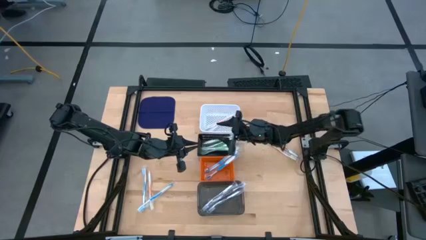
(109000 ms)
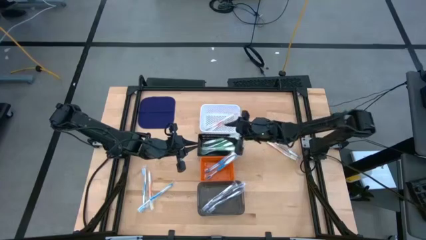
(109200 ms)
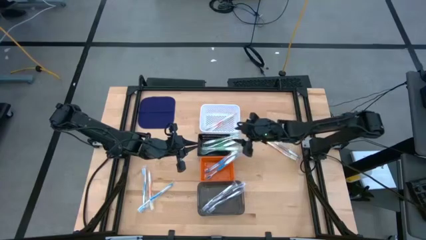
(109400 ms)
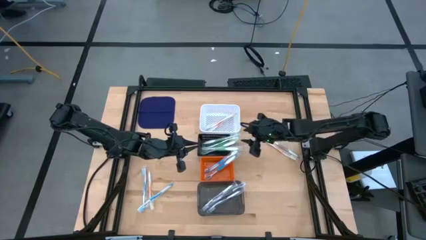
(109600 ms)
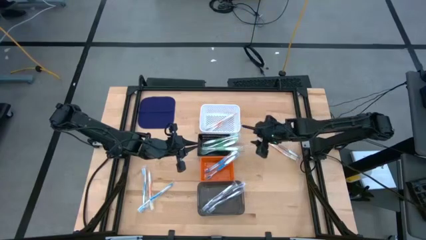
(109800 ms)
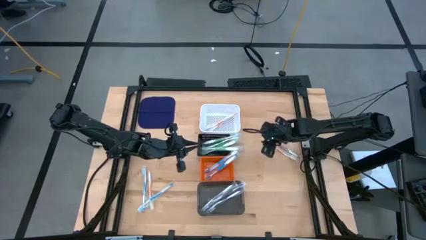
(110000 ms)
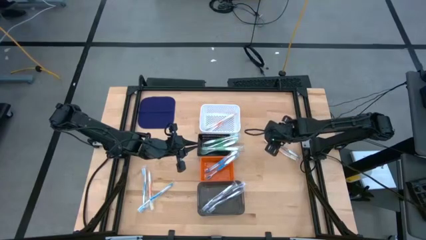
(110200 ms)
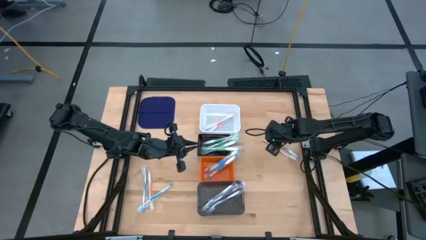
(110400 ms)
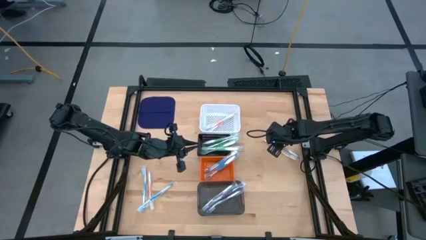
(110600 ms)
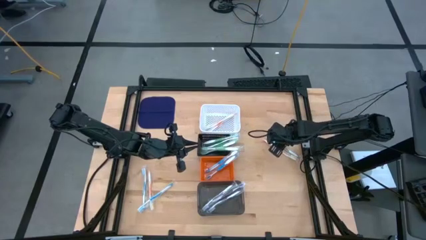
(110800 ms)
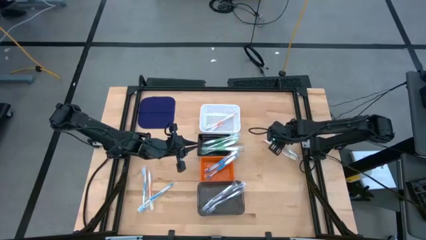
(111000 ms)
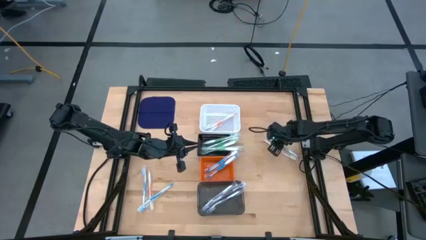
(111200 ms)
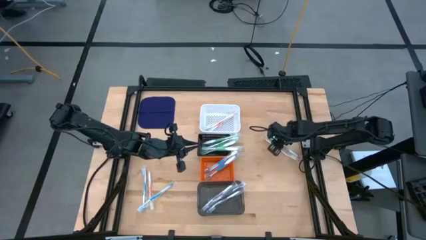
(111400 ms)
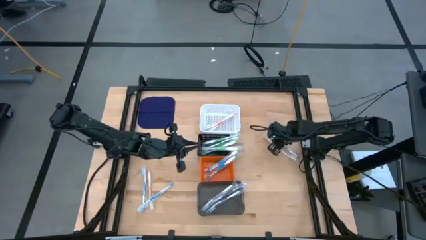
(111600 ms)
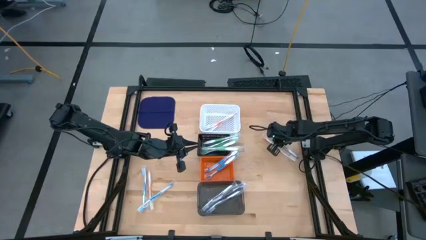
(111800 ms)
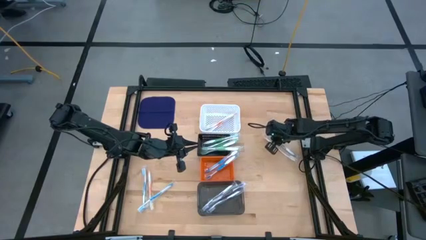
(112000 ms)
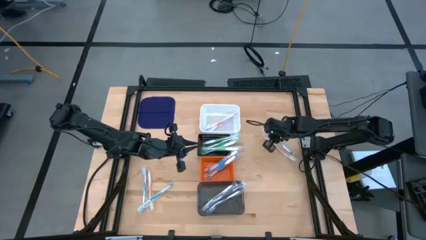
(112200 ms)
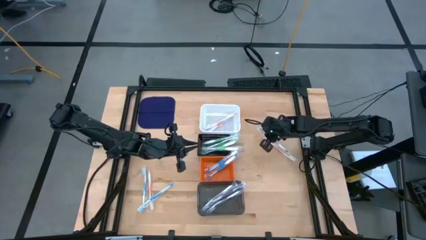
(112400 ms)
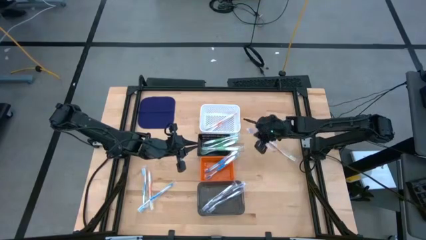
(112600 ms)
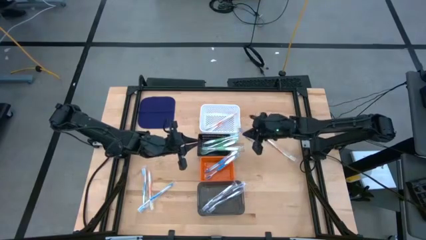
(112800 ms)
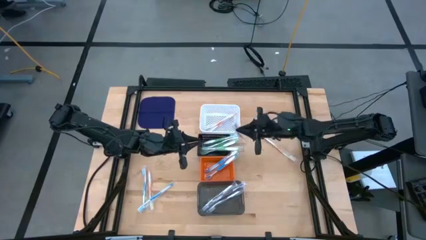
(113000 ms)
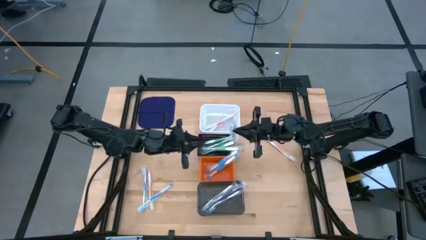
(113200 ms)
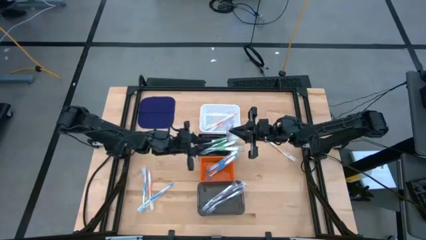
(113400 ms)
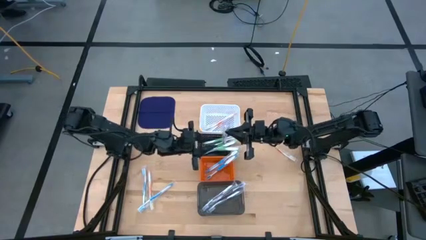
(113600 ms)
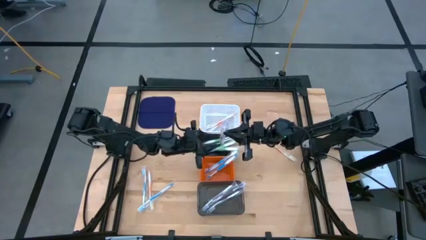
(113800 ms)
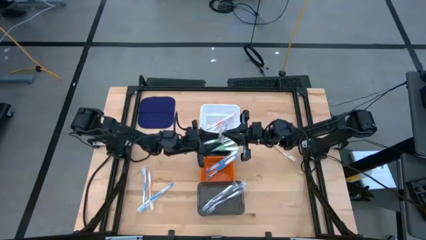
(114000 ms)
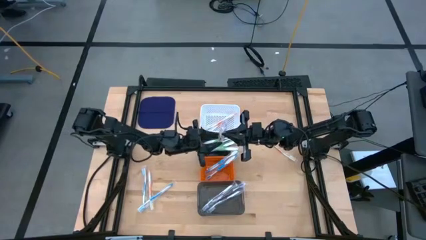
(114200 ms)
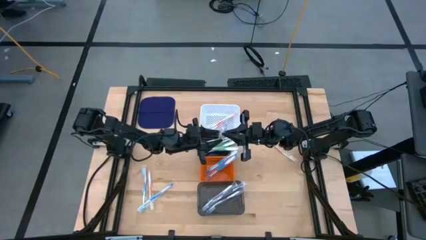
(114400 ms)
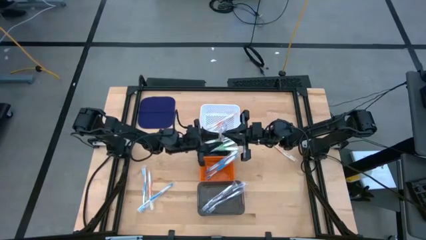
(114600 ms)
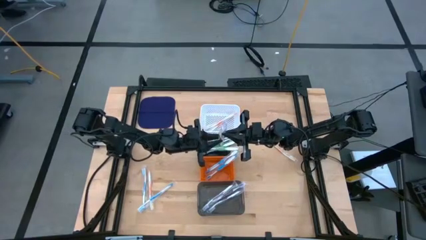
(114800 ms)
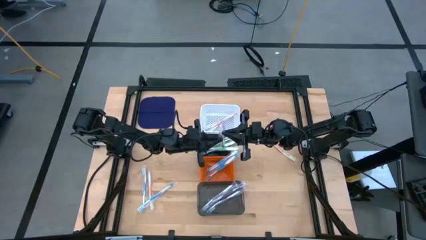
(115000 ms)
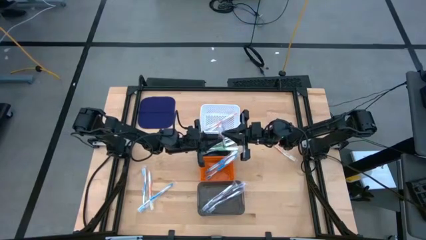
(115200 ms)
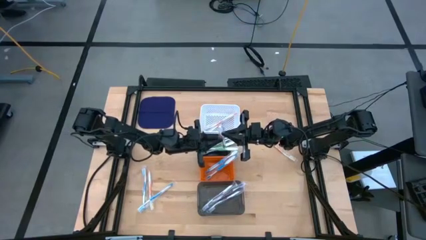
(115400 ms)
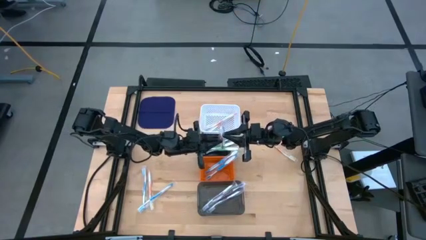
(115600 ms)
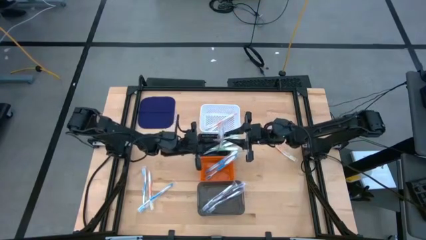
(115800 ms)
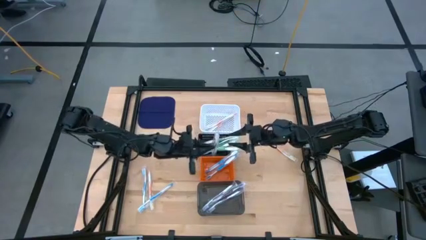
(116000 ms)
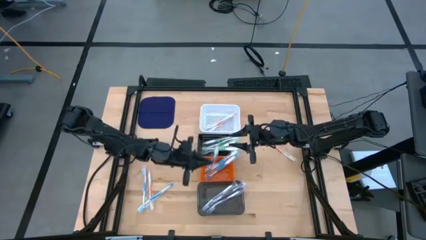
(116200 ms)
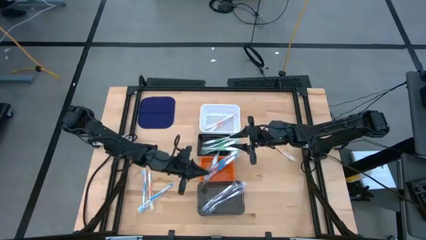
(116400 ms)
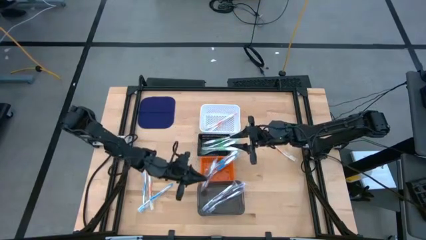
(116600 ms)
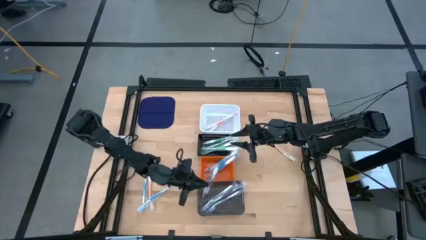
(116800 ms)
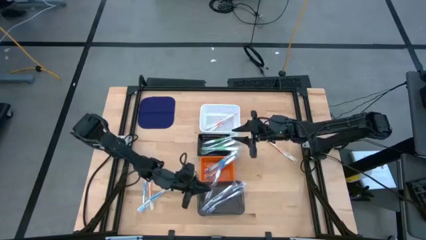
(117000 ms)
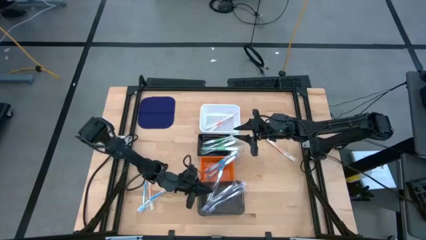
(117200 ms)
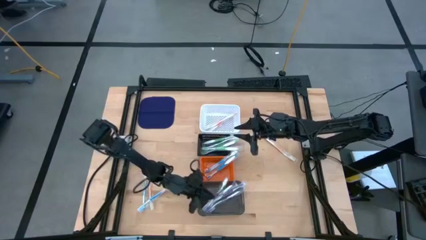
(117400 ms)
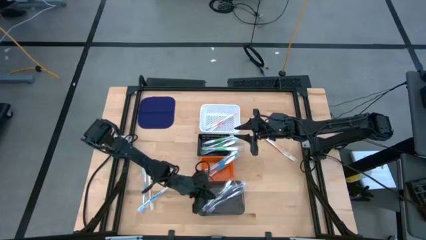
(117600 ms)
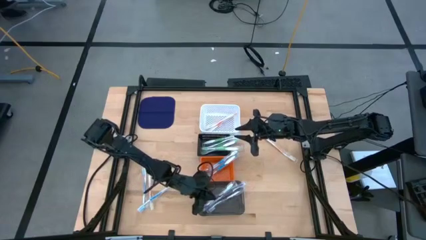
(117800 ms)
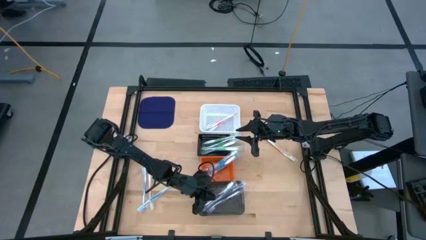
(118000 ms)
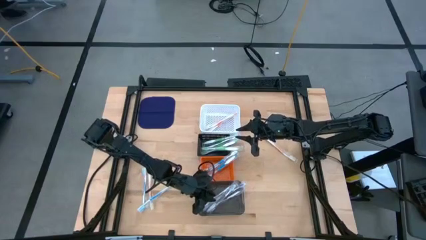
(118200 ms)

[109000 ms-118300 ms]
Task: Pick & Place Toothbrushes
Put the purple toothbrush into the black bin

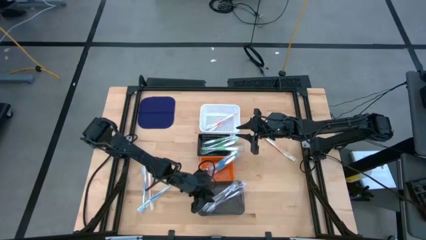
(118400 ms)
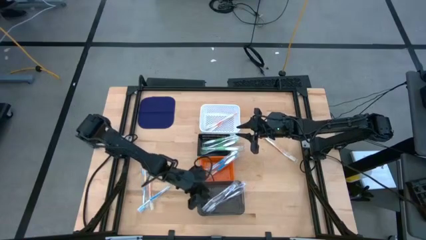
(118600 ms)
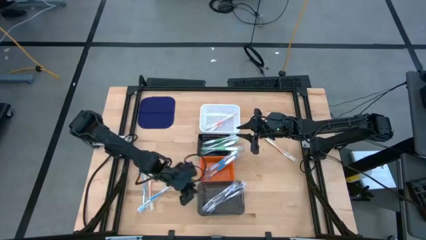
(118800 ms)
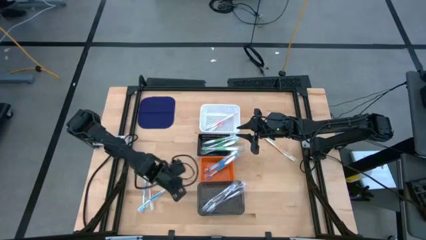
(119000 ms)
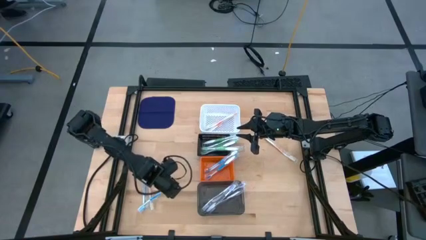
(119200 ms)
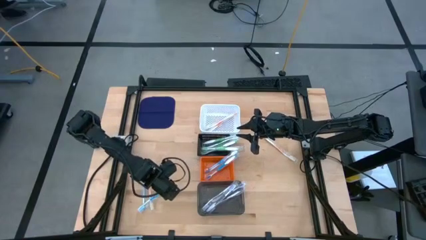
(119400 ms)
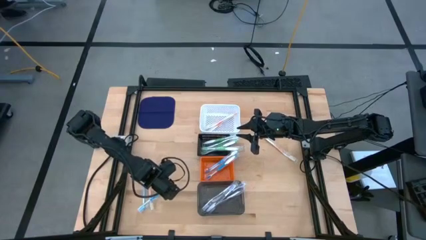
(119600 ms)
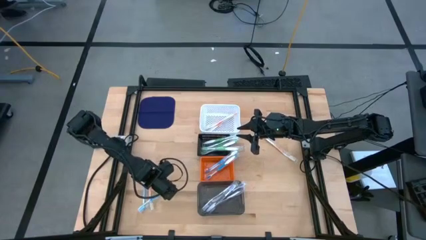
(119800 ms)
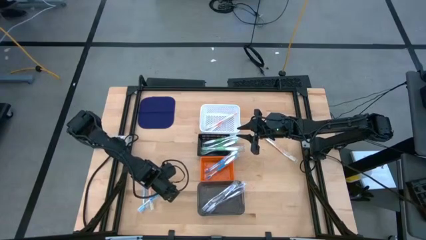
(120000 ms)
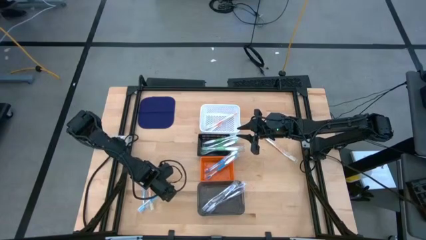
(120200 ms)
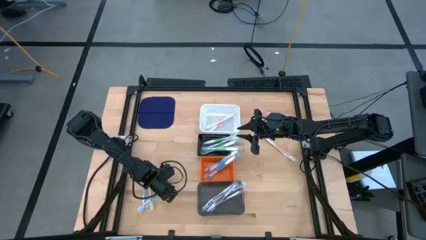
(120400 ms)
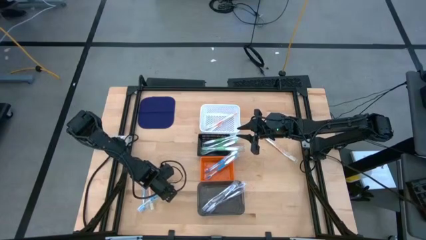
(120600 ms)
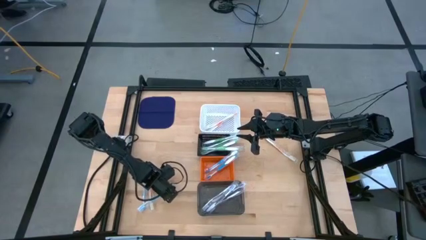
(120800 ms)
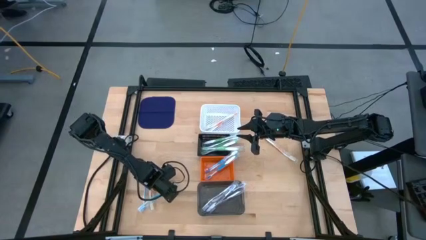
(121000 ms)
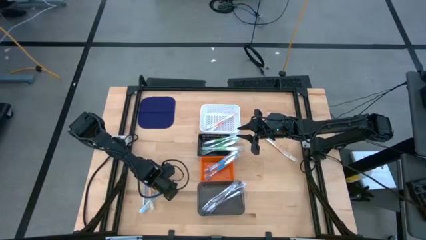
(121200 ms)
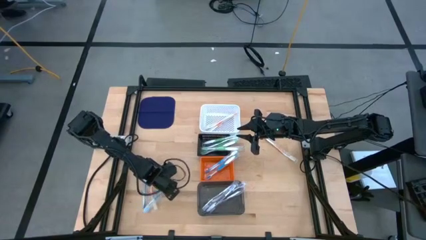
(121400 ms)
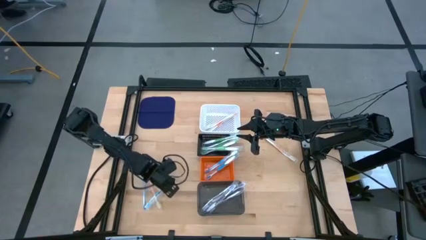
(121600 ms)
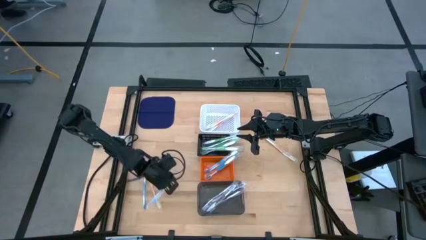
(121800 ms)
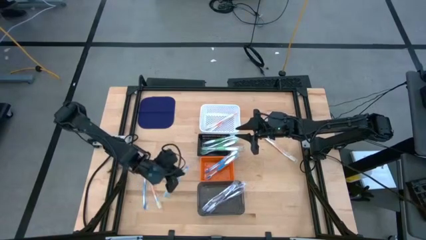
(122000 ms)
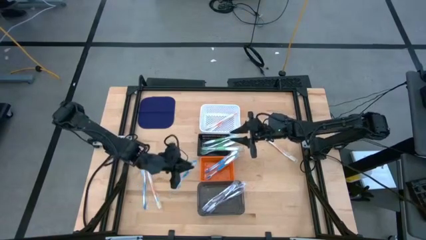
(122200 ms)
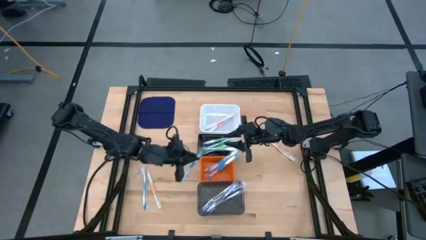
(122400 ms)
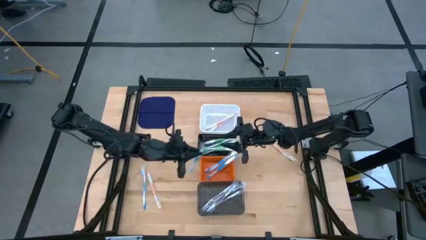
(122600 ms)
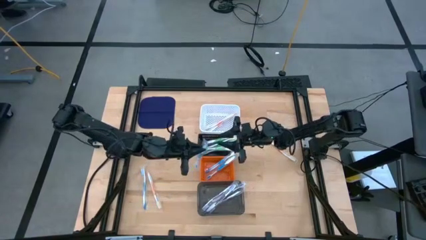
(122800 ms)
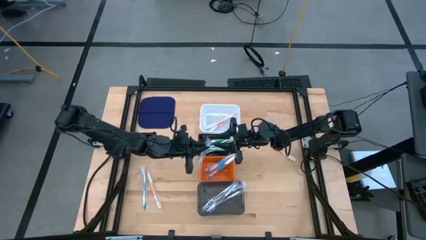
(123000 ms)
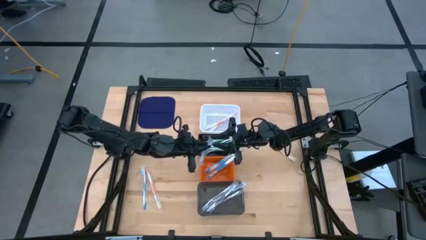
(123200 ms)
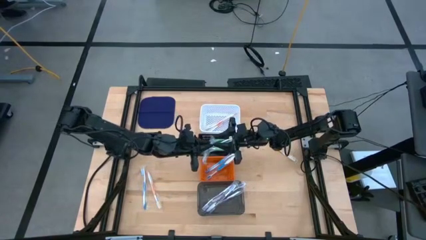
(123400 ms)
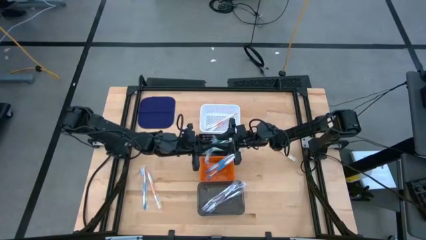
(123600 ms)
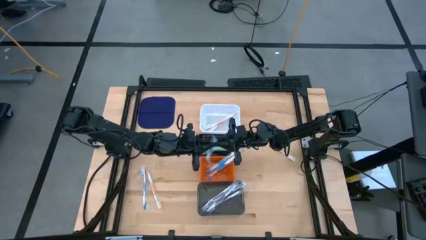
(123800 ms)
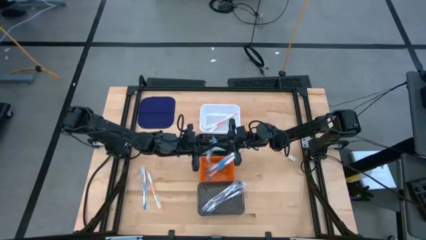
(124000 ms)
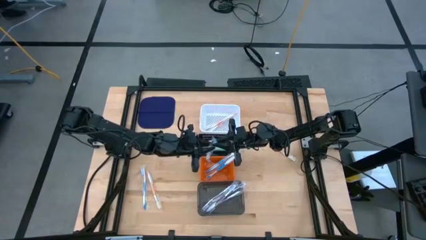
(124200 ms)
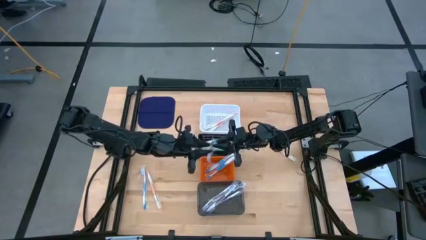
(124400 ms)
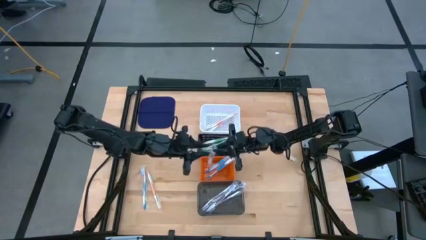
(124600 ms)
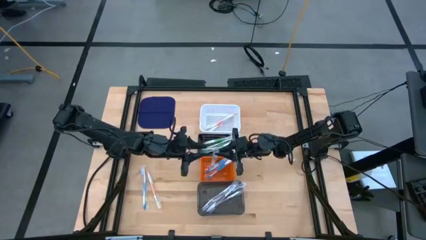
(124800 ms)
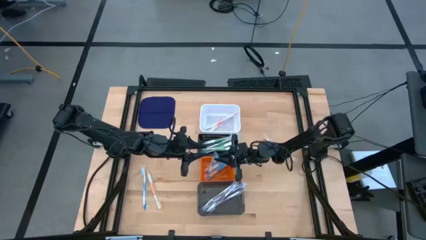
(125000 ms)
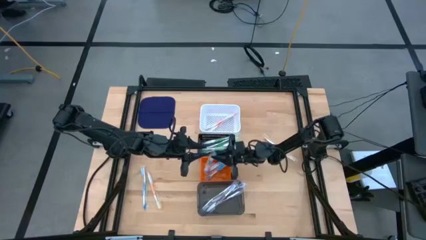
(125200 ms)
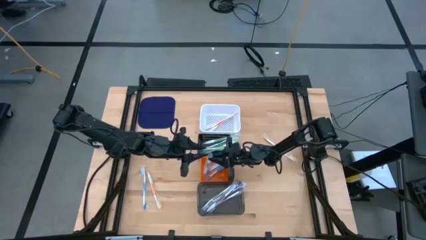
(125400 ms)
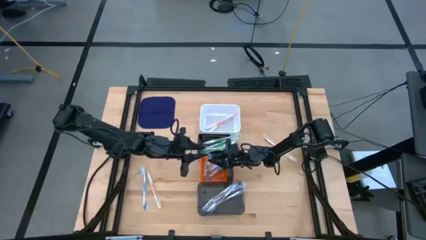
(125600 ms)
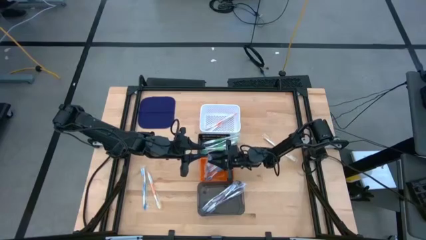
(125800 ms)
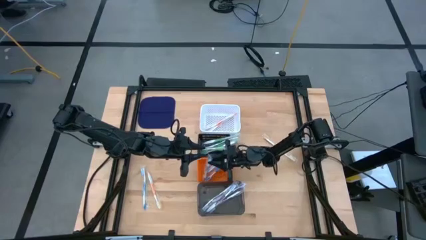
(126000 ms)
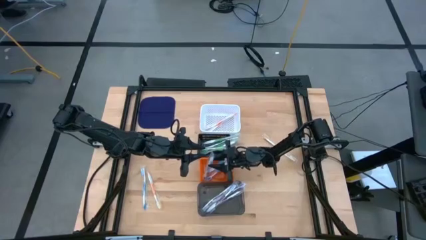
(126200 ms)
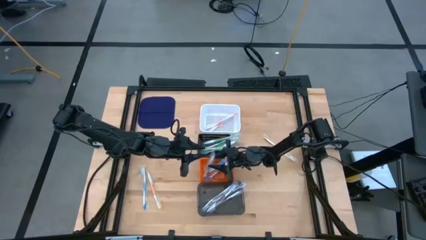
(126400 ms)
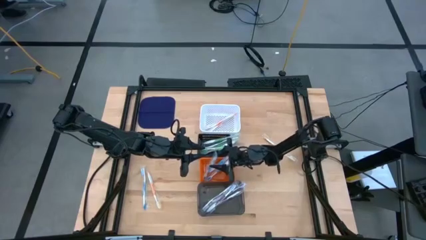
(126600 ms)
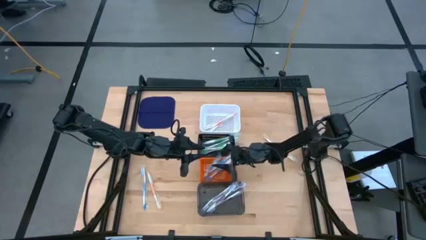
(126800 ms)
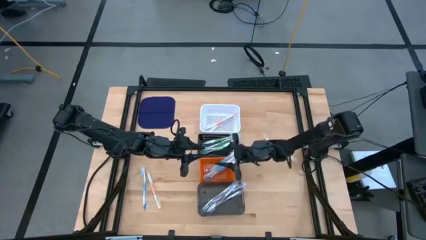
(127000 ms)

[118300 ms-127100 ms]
Put the blue toothbrush into the orange basket
